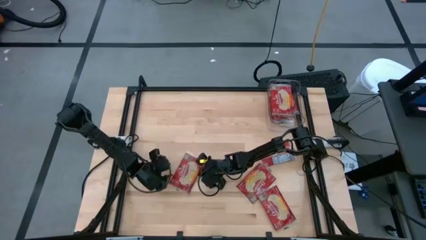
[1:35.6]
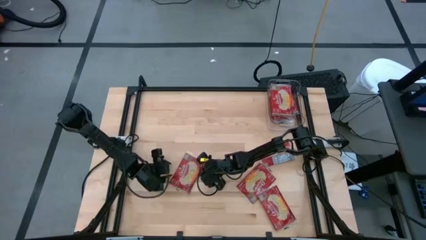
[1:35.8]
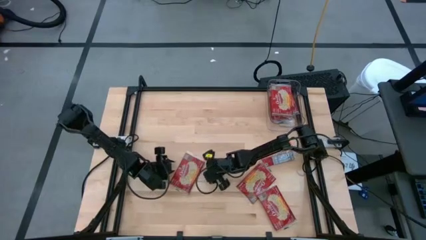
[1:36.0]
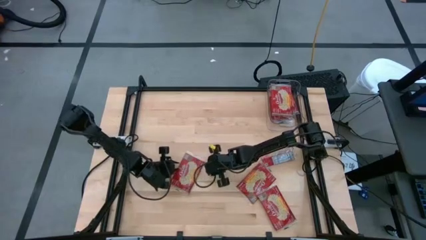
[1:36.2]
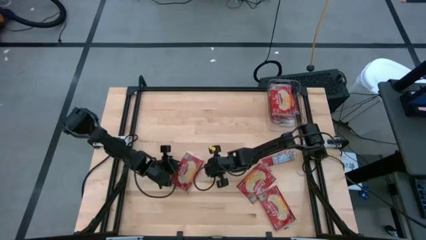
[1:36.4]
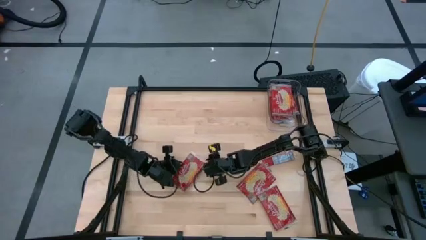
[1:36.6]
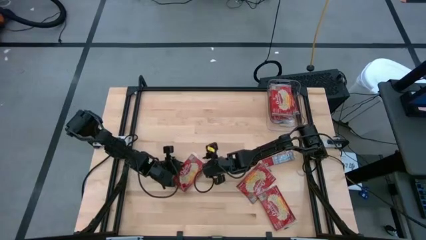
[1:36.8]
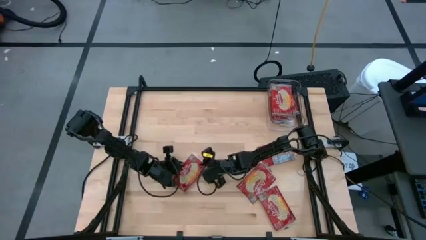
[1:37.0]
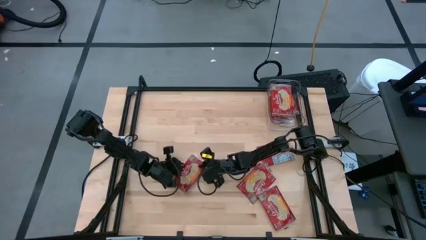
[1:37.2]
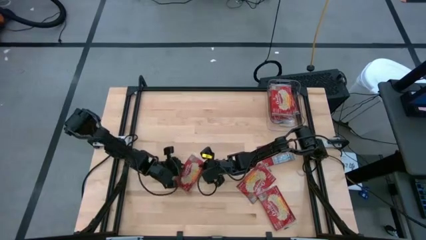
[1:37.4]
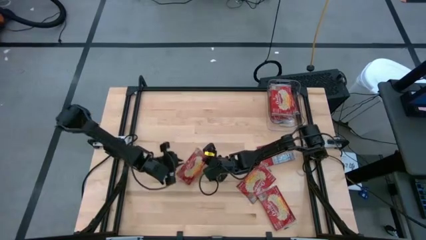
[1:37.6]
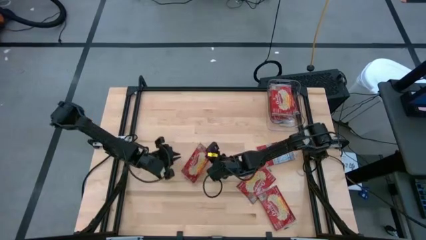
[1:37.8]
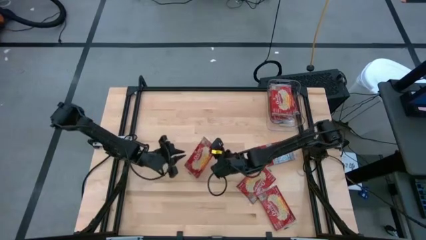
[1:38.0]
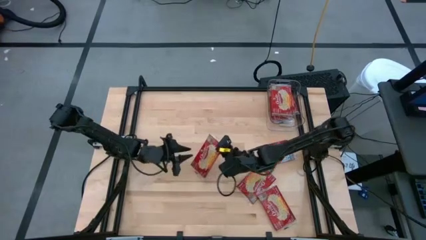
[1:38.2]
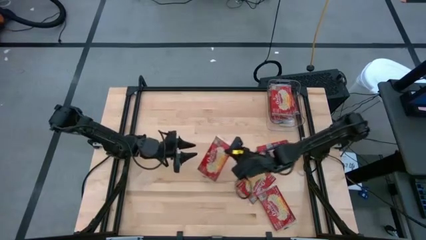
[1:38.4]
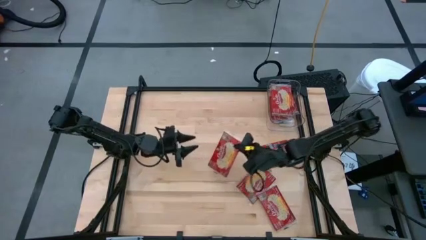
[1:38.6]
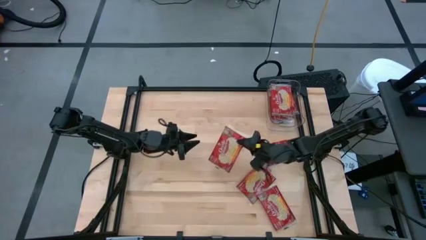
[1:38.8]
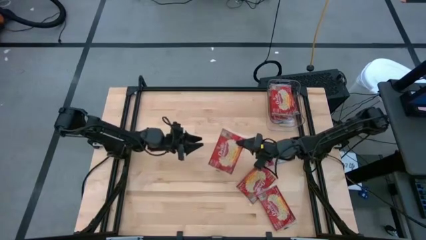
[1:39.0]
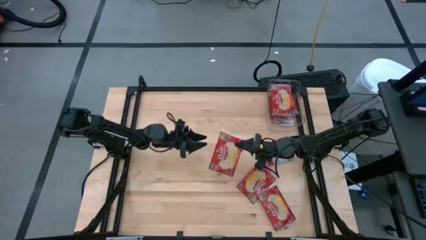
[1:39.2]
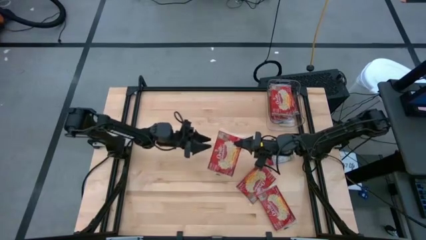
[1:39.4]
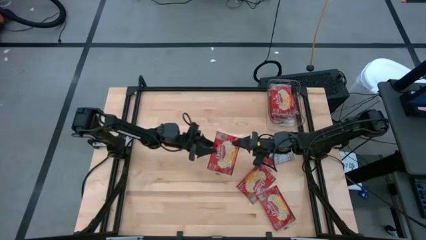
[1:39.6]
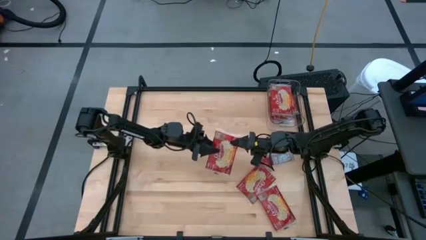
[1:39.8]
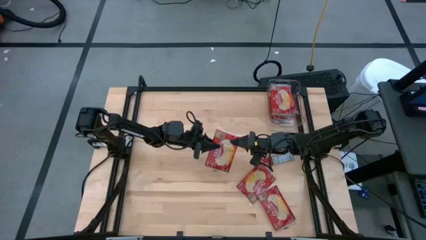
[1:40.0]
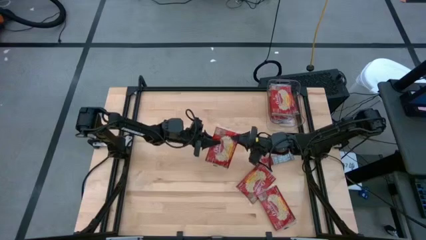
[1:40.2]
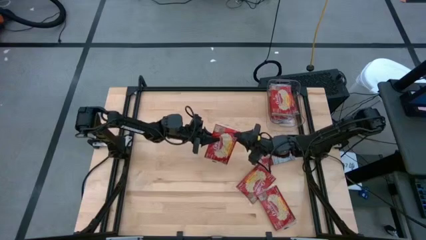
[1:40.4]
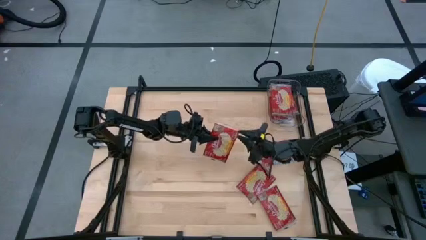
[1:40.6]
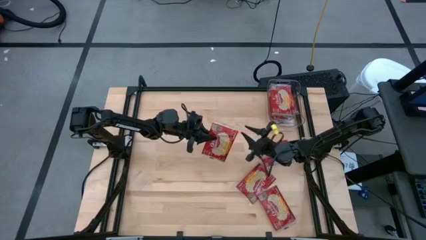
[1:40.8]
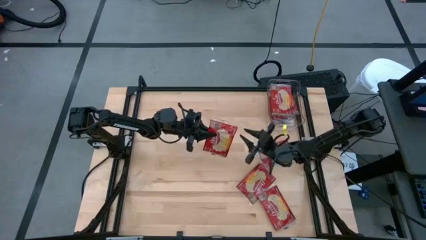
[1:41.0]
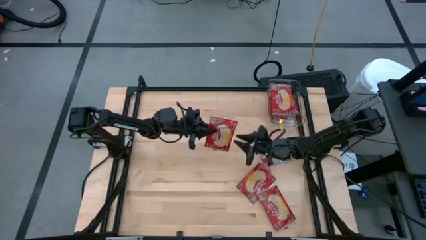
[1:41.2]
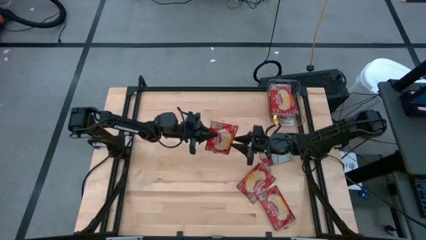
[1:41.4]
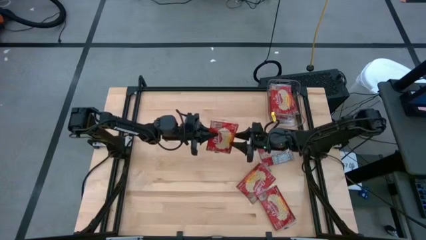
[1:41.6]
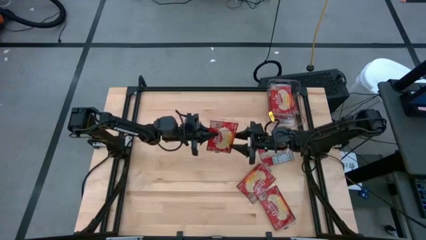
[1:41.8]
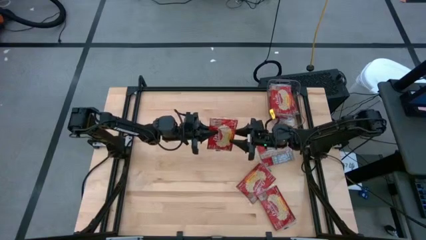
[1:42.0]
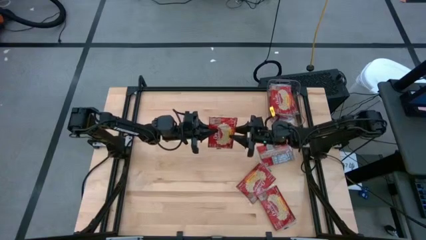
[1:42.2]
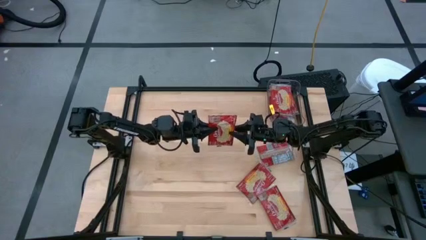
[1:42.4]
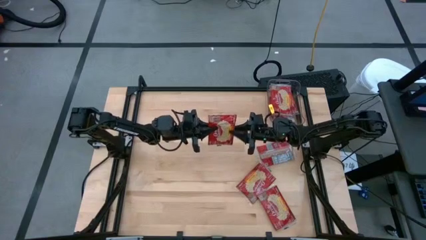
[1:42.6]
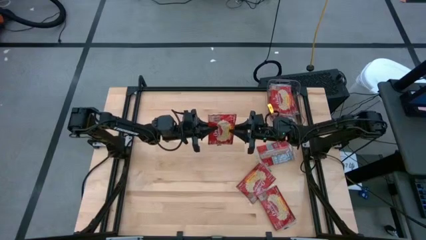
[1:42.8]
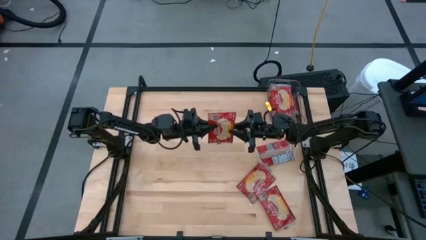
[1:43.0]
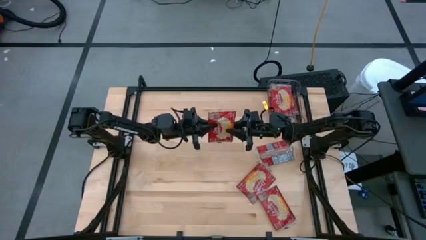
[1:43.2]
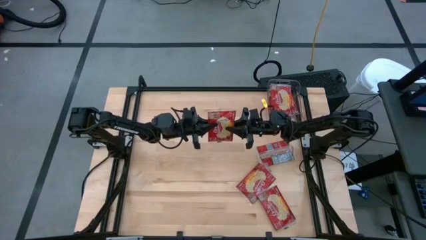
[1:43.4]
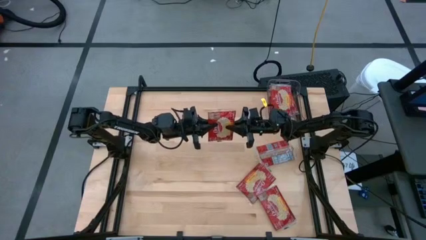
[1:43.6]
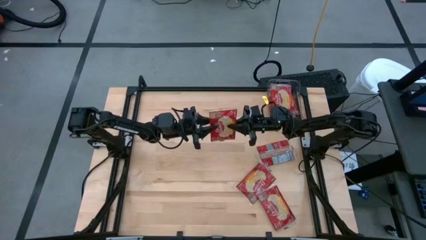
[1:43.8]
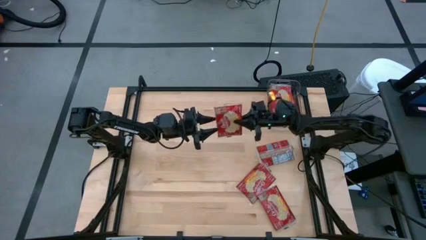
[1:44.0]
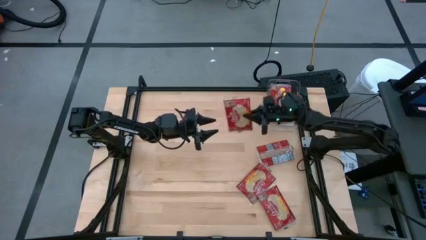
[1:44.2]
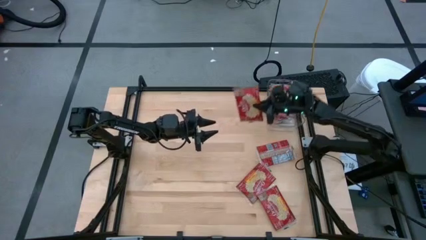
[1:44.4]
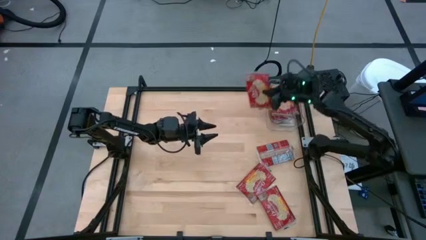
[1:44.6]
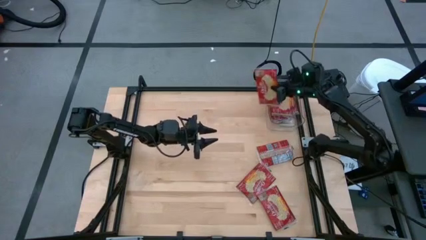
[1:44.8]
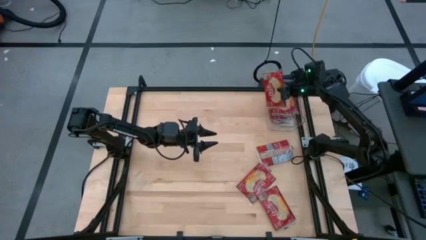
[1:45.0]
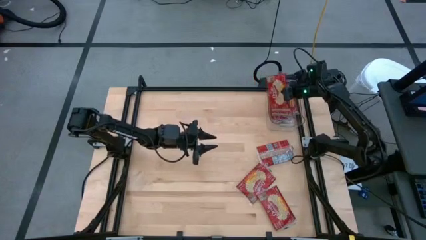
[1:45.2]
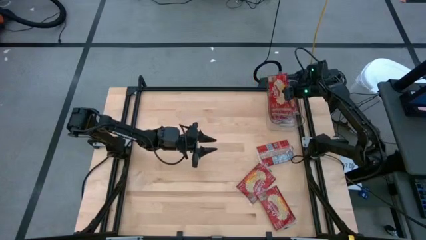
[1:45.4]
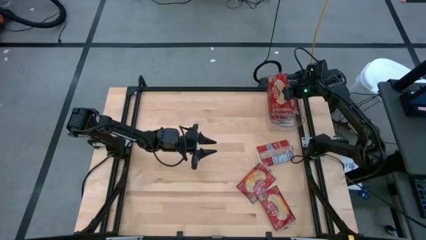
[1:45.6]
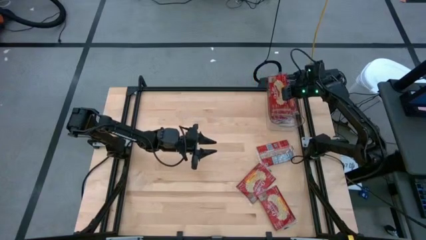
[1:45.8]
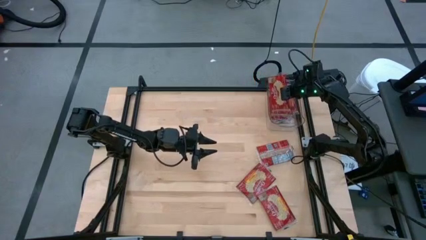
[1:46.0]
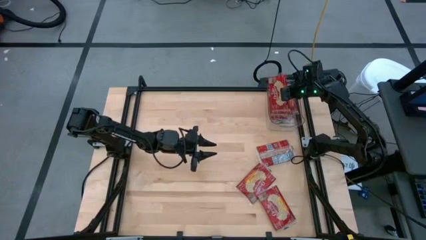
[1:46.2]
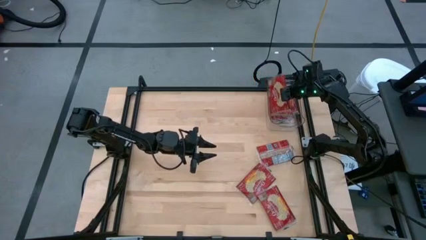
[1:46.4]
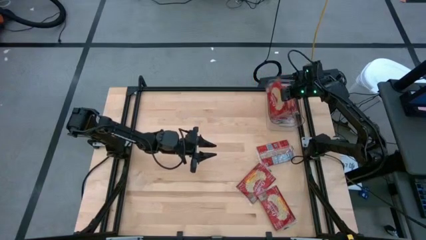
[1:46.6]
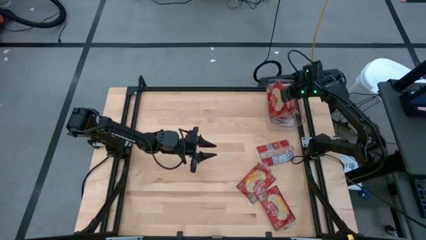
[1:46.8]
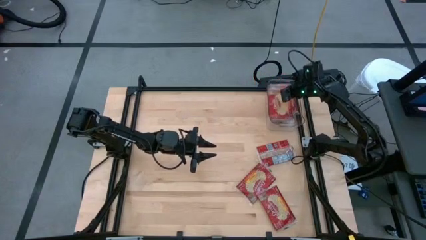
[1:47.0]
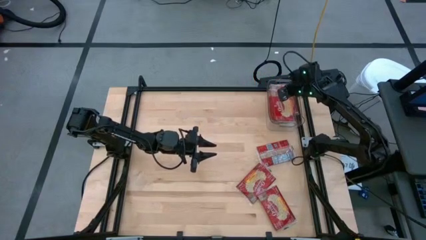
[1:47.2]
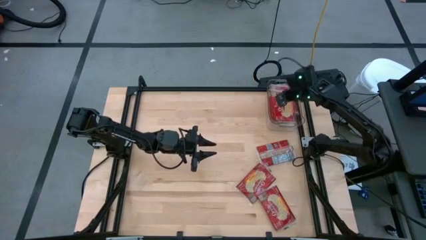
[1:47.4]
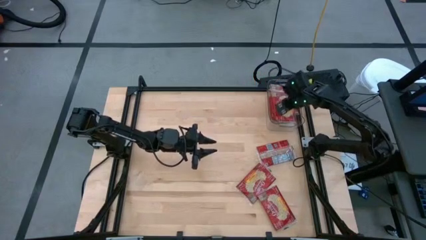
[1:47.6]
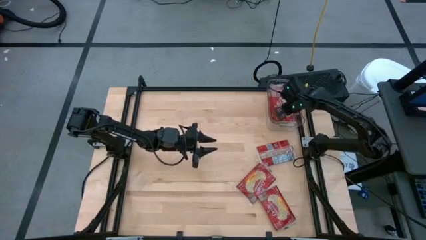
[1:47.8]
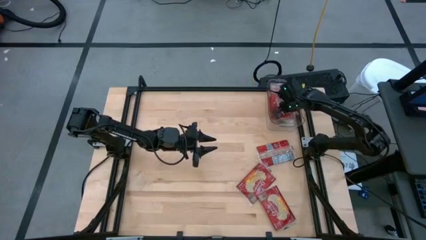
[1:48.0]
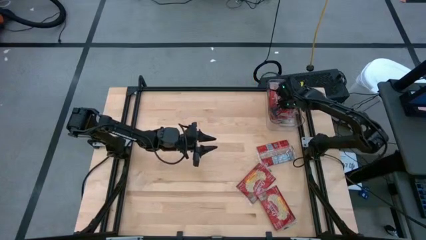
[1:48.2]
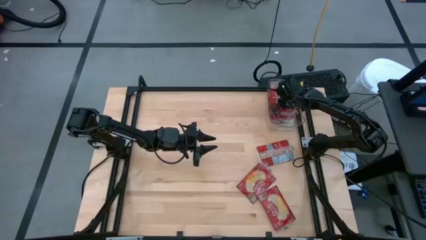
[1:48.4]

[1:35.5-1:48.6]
Task: Sort popcorn bags into baskets
Put the red popcorn bag into the transparent bin

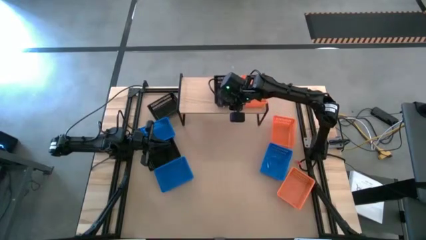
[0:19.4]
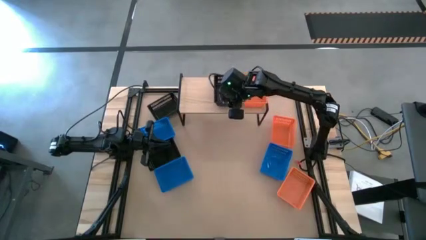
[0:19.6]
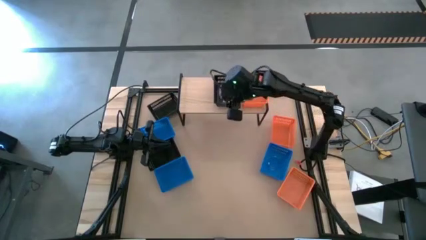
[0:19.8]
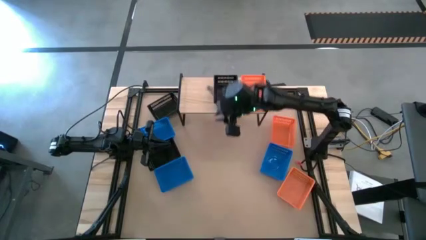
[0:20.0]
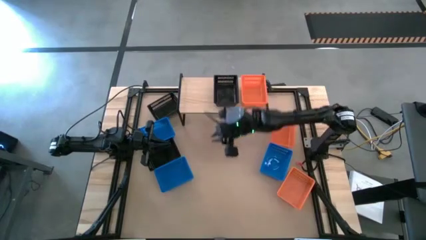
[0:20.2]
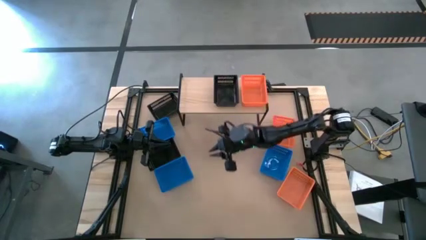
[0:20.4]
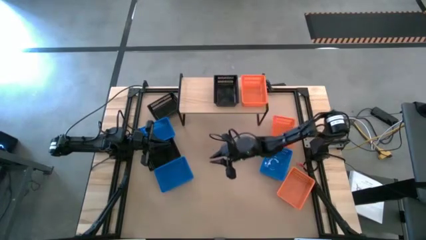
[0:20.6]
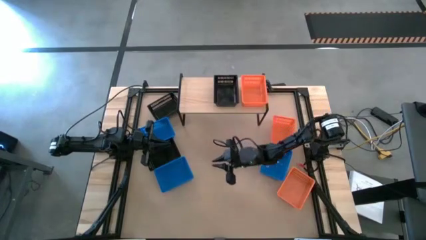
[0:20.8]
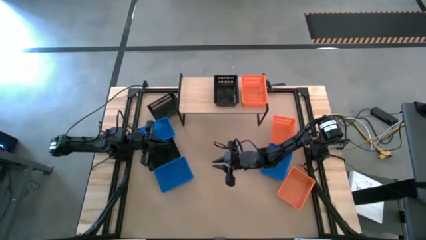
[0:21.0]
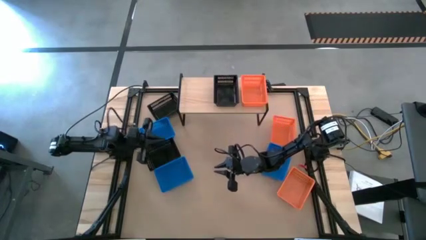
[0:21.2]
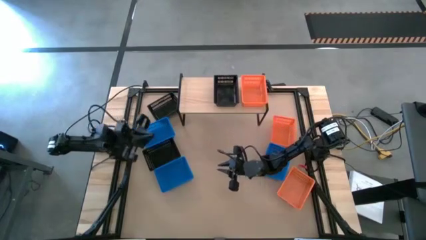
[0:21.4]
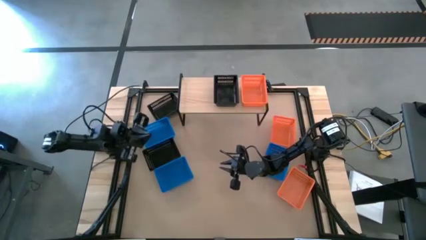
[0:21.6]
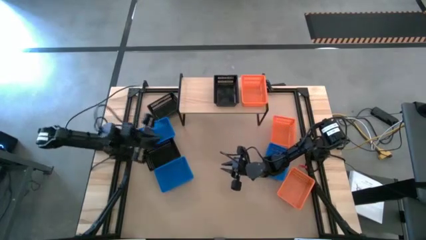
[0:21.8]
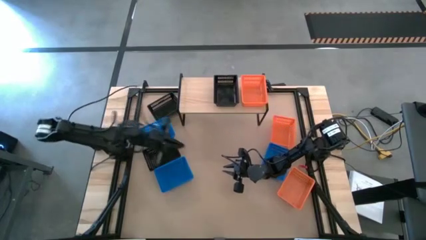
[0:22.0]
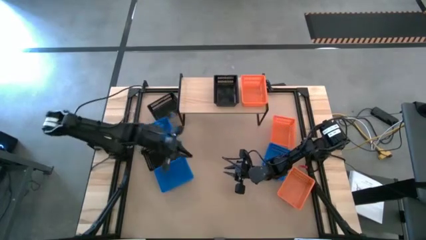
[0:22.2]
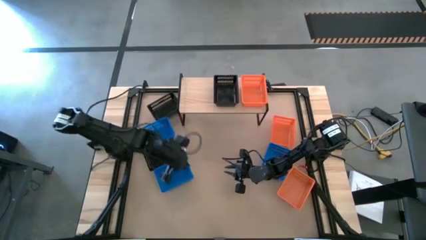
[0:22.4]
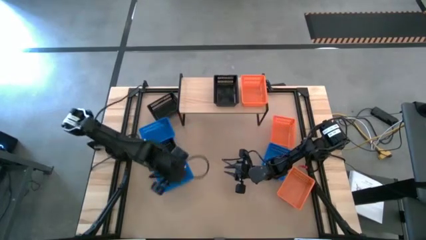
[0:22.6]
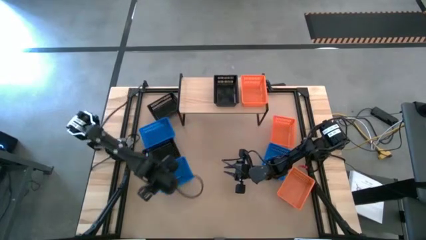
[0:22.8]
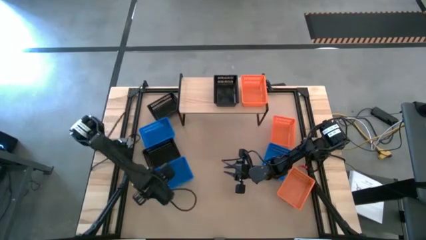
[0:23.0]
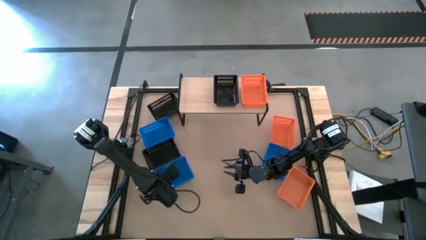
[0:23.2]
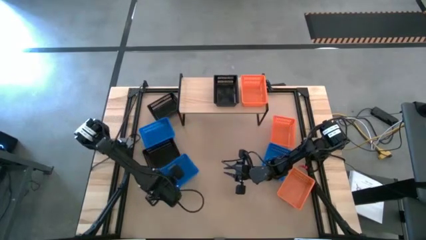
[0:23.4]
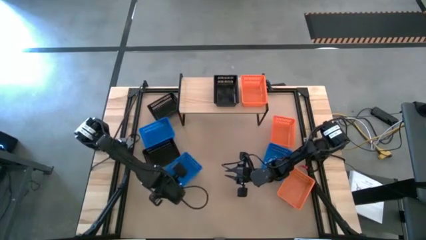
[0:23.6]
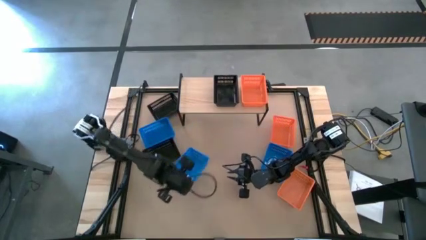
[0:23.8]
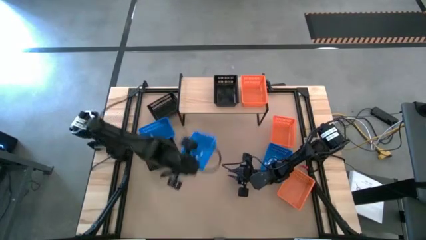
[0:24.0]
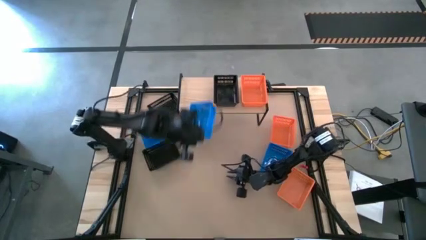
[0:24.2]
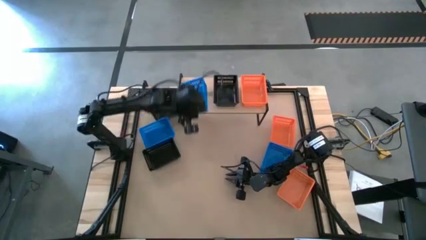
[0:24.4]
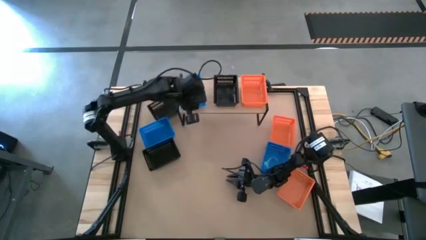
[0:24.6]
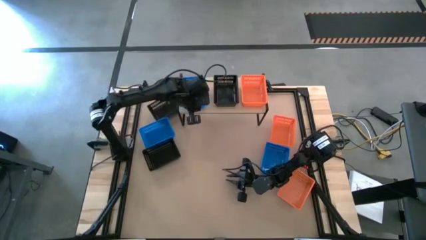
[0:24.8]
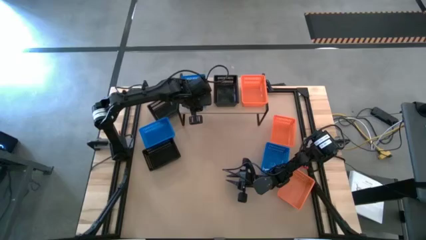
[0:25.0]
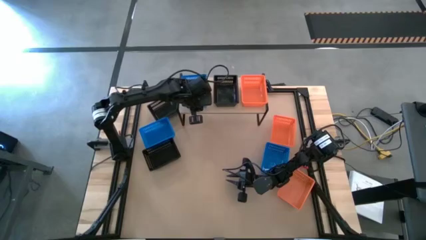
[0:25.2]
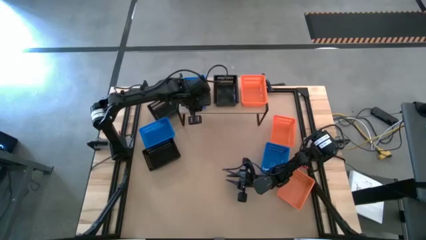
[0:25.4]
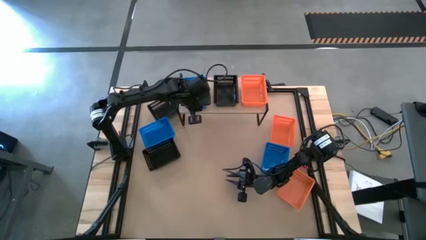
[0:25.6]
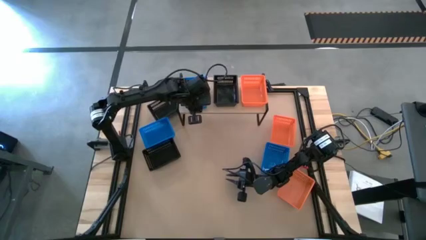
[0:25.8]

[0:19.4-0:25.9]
Task: Stack baskets on shelf by color
Put the bottom left blue basket on the shelf
